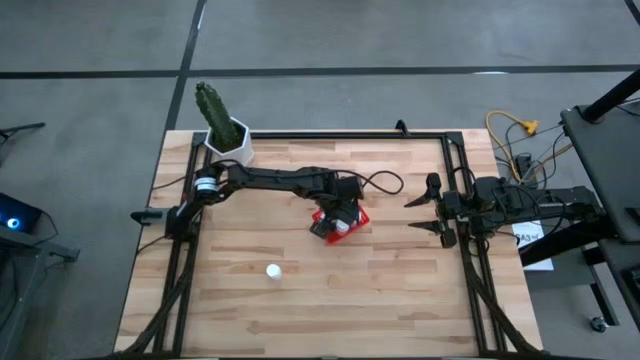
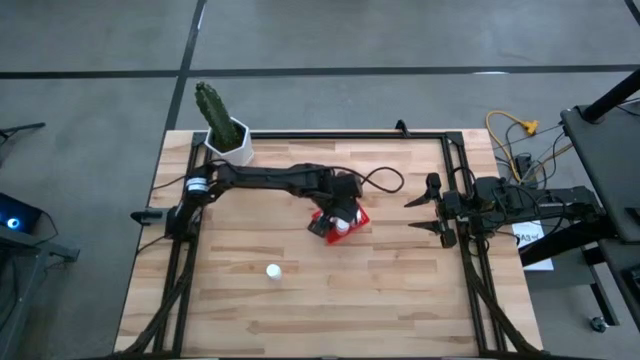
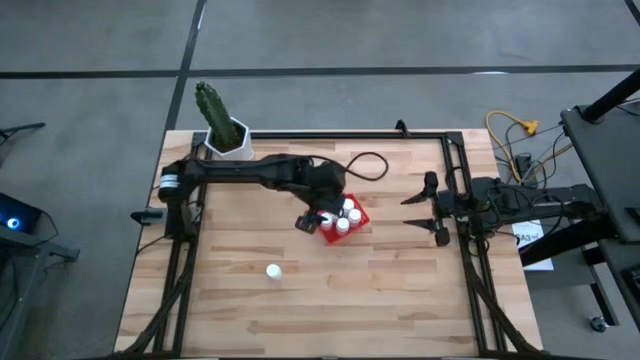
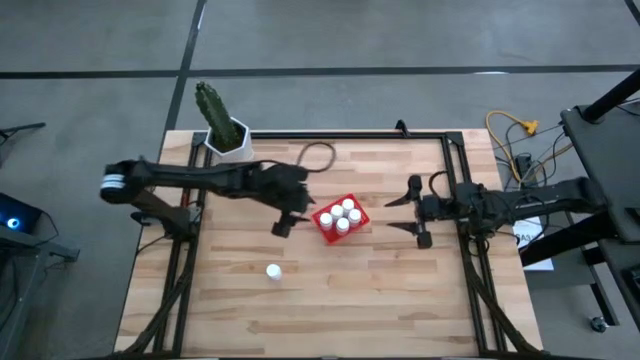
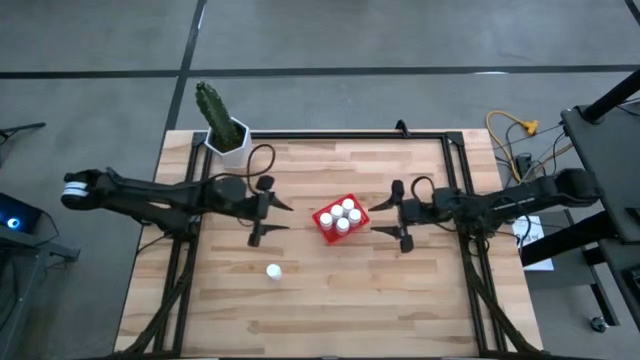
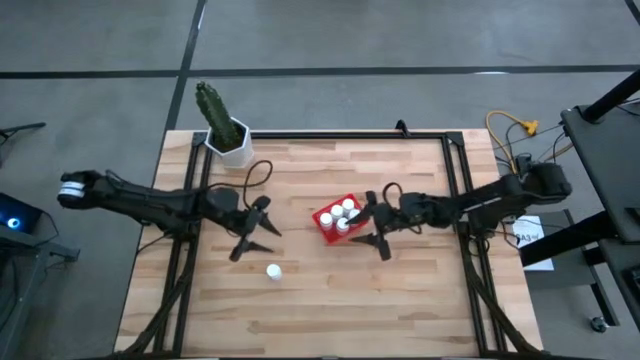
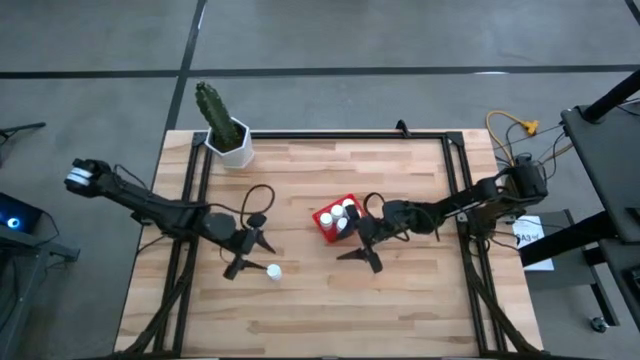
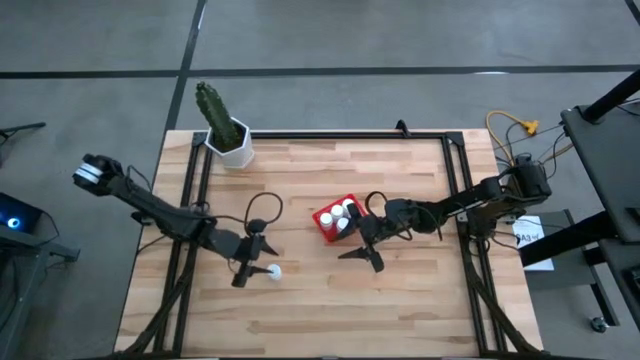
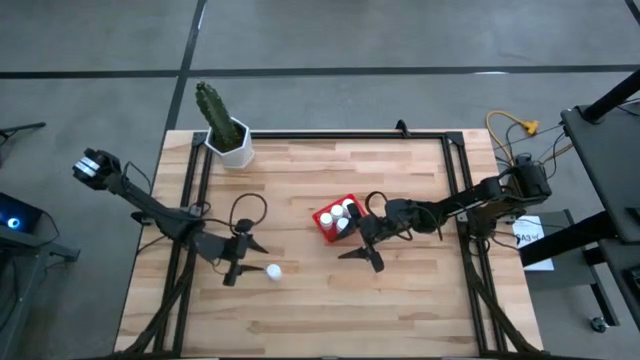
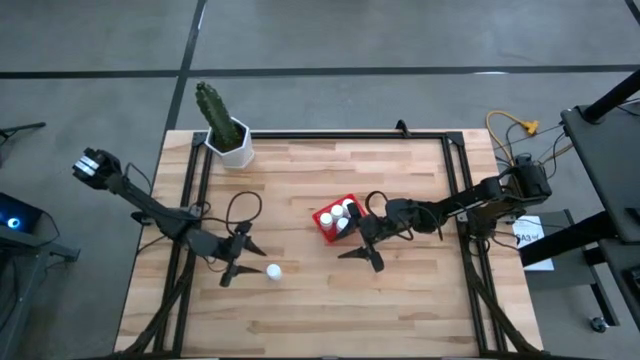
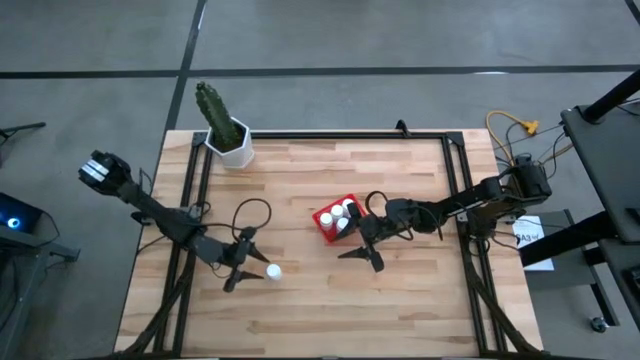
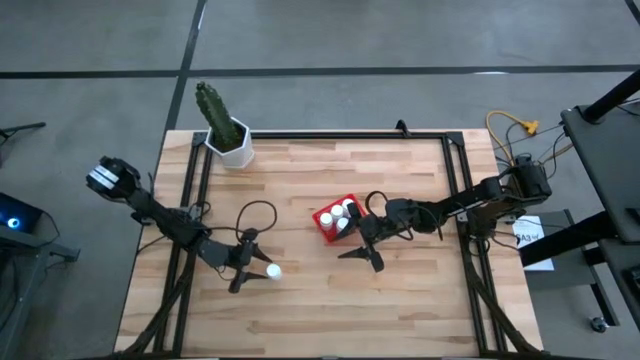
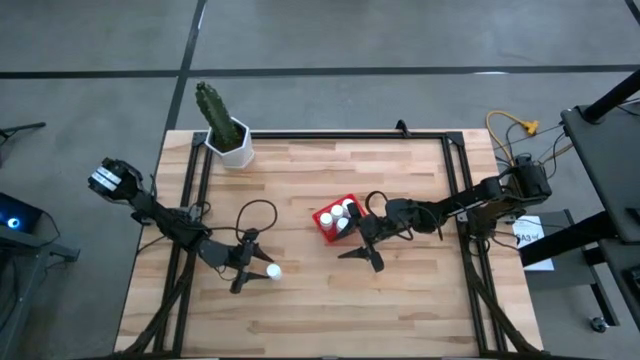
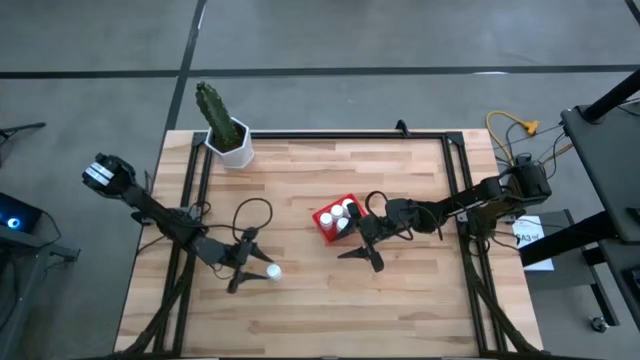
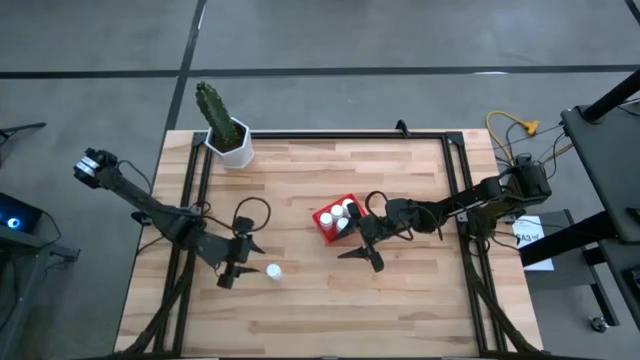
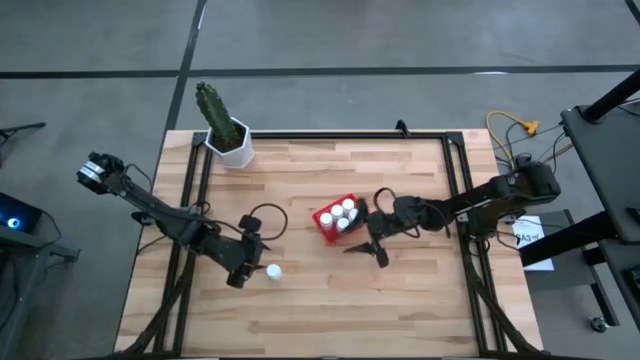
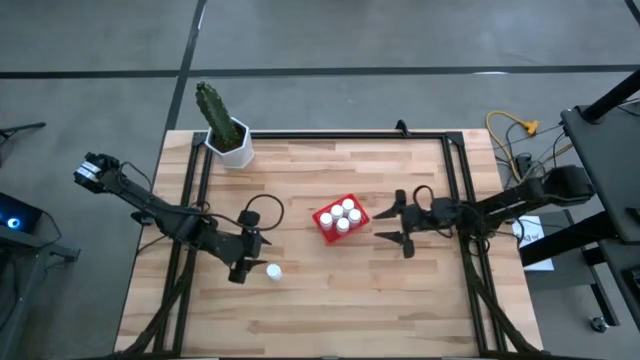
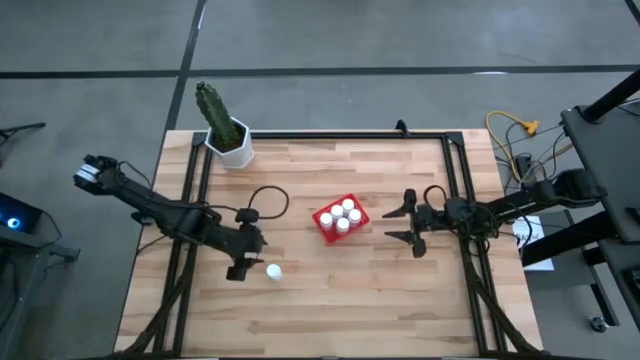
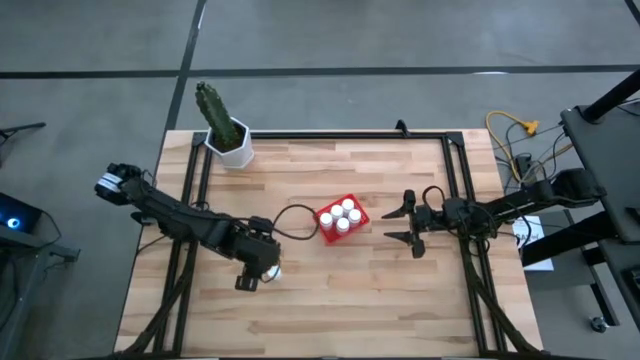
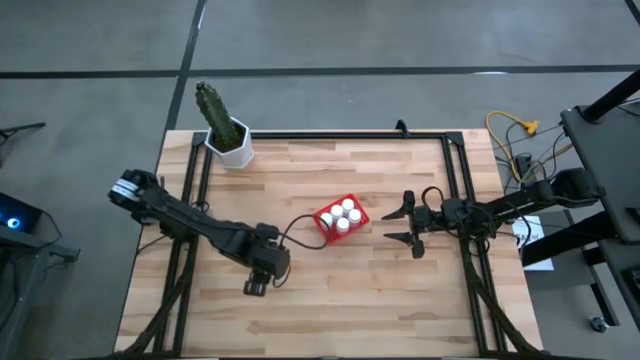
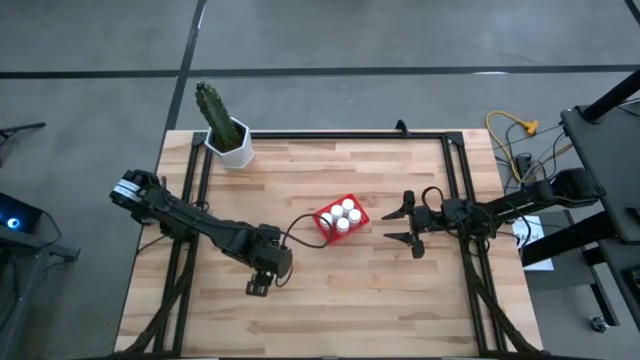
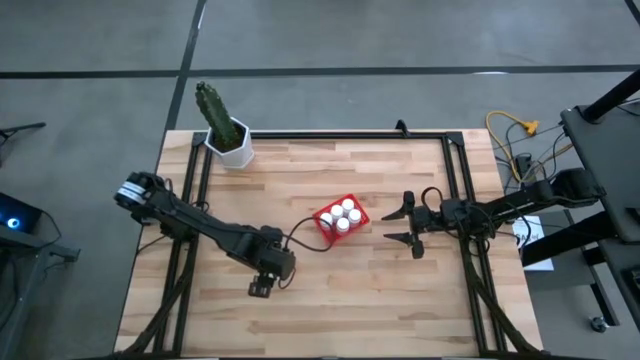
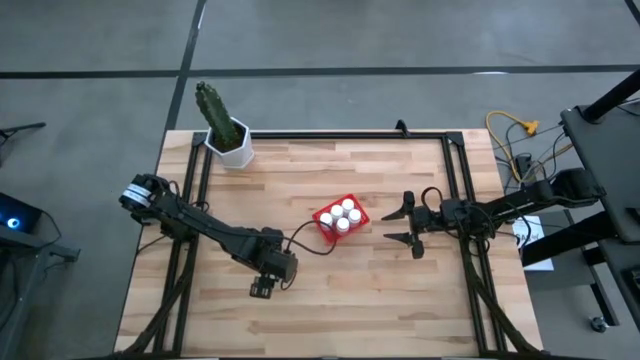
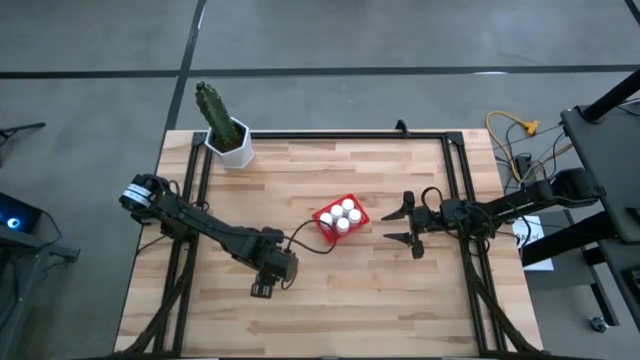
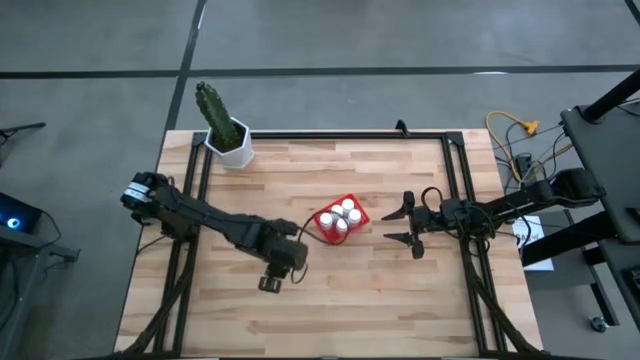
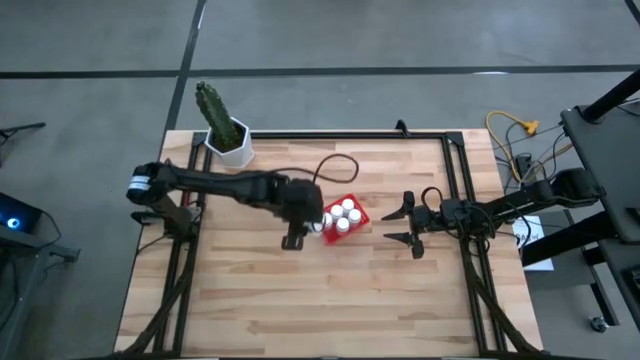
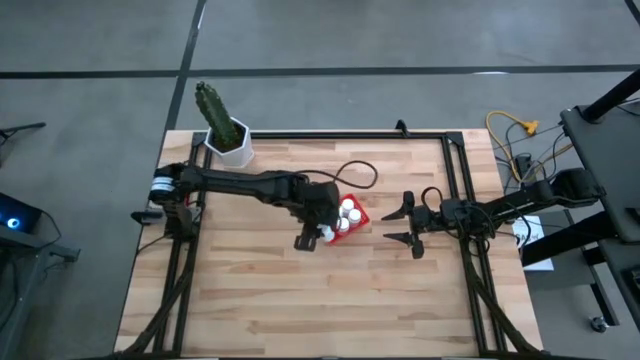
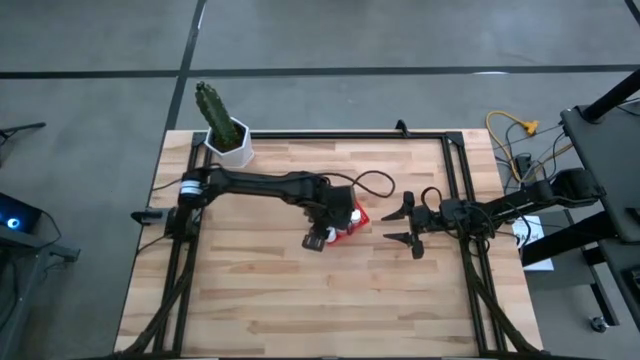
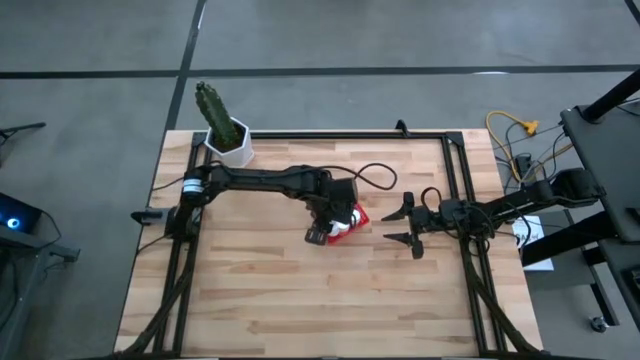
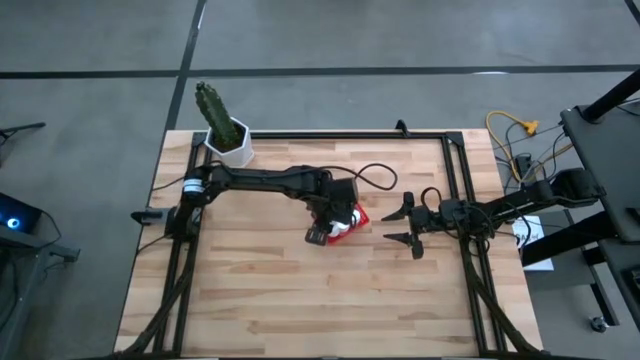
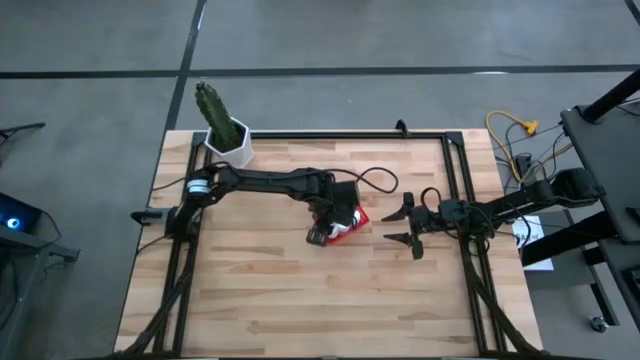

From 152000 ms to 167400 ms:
Task: Pick and place pill bottles into a basket
Put the white pill bottle into the red bin

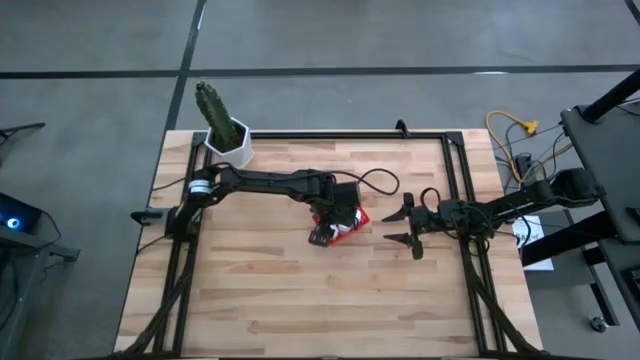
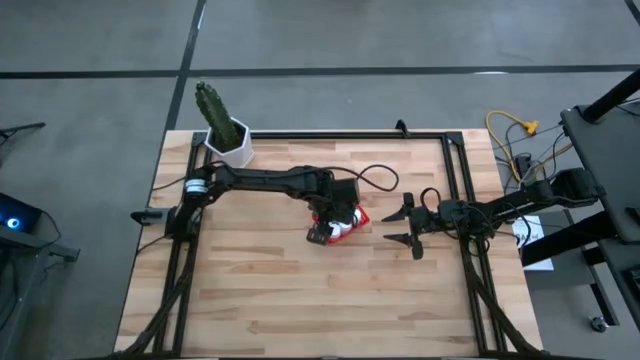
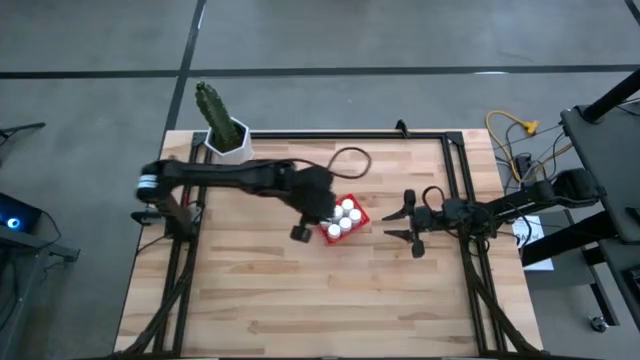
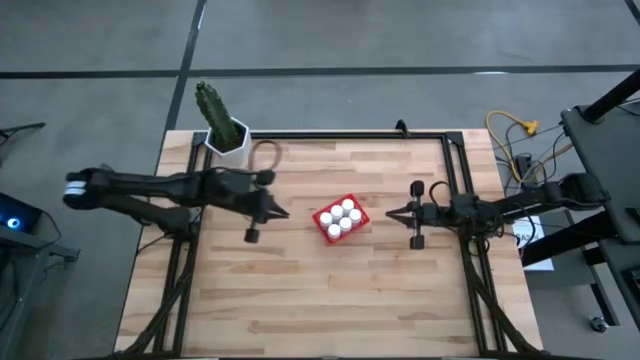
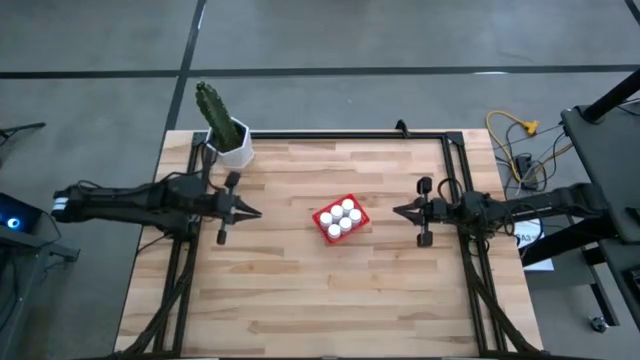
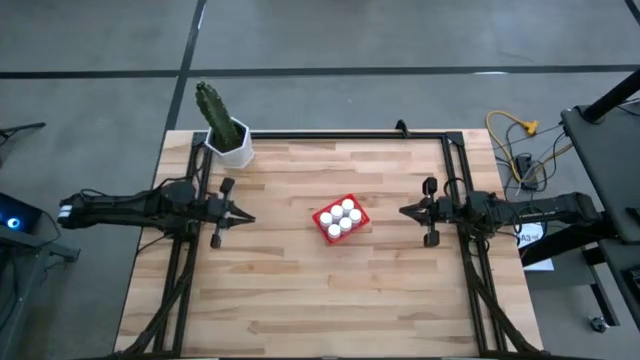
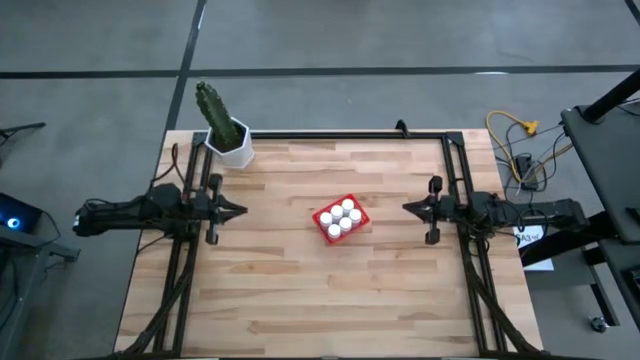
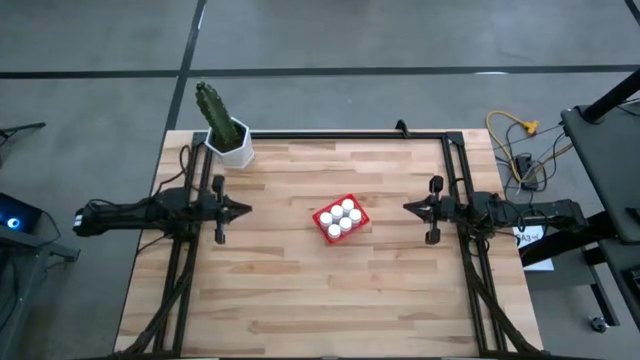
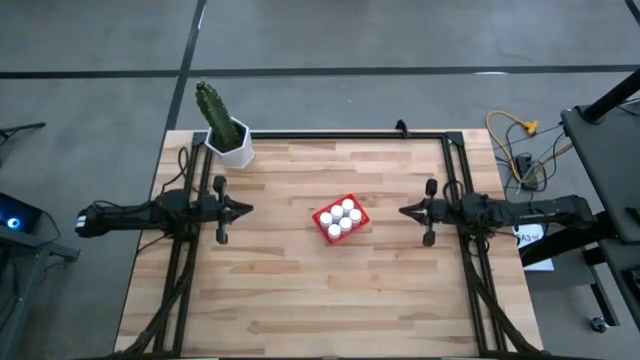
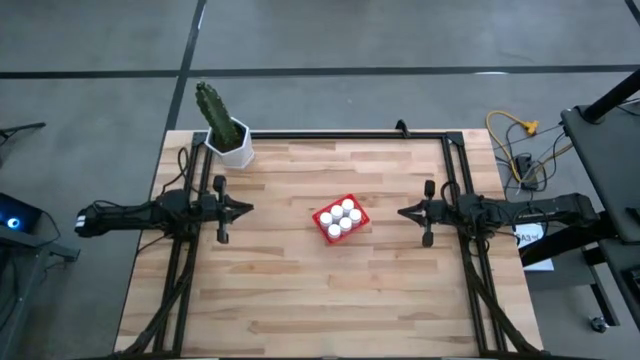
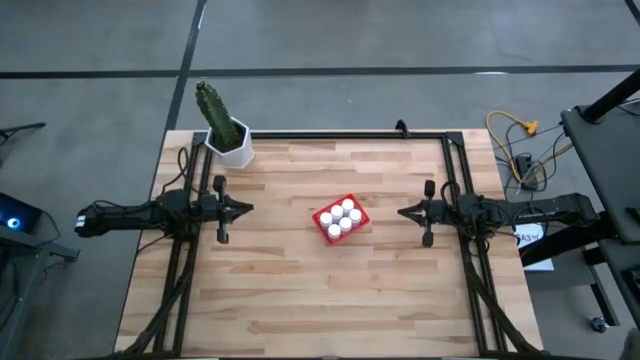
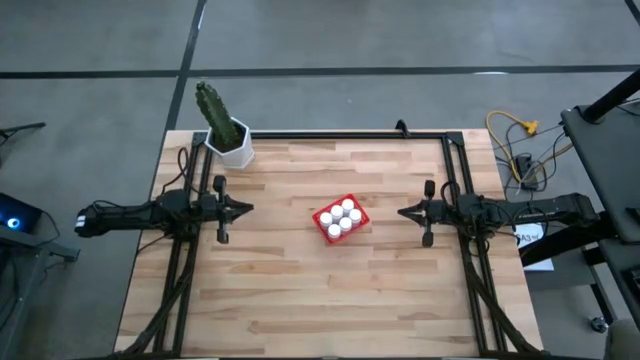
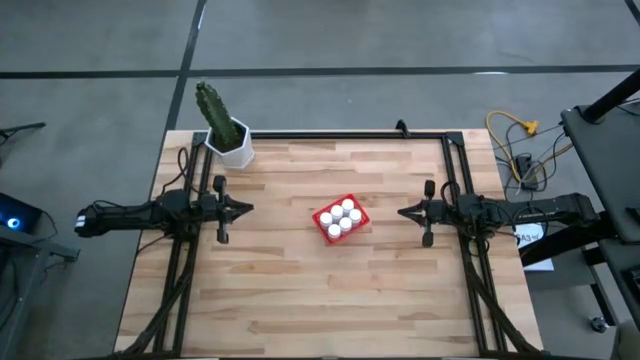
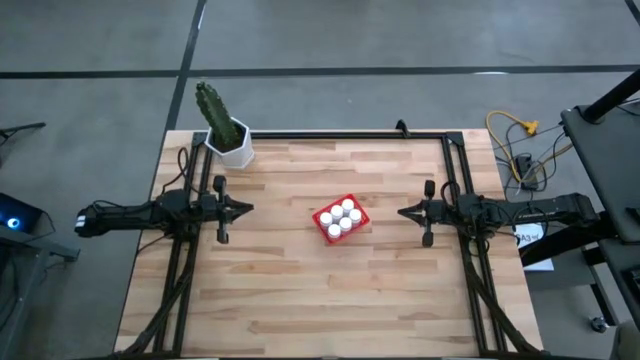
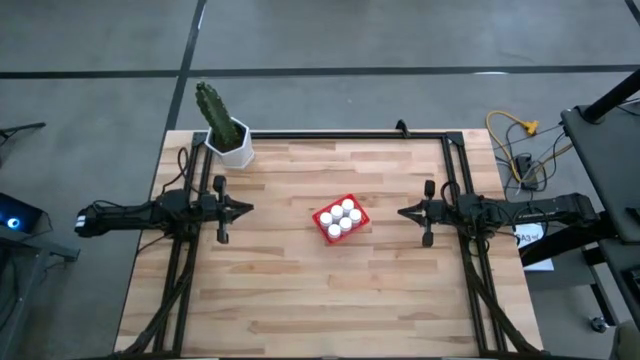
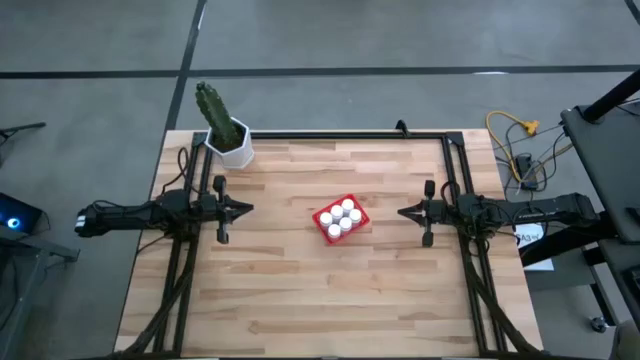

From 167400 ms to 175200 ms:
Return to Home Position
